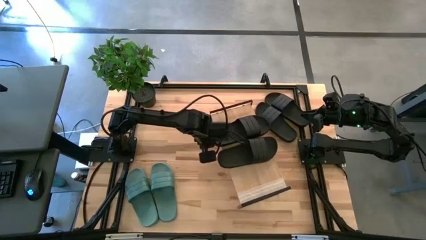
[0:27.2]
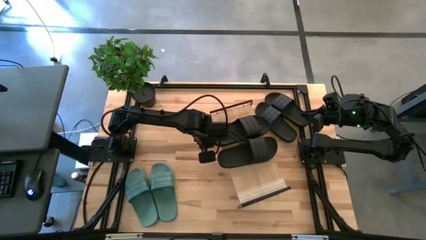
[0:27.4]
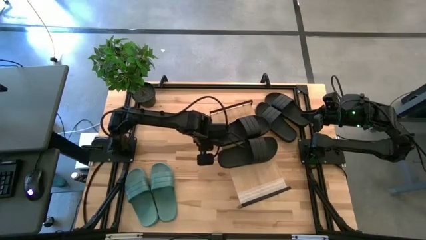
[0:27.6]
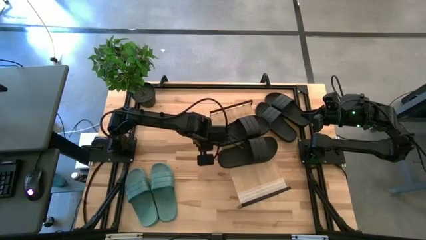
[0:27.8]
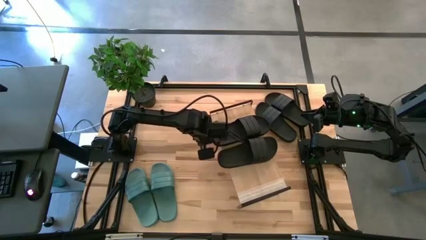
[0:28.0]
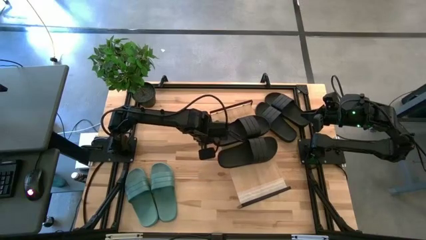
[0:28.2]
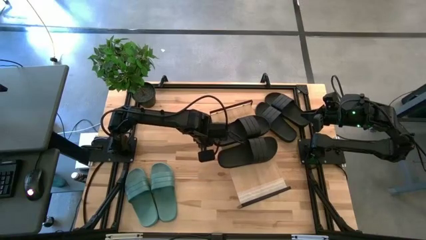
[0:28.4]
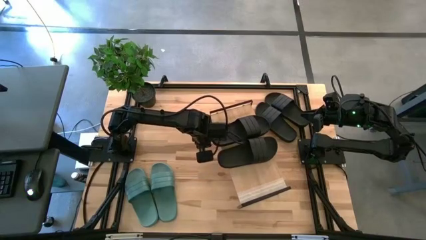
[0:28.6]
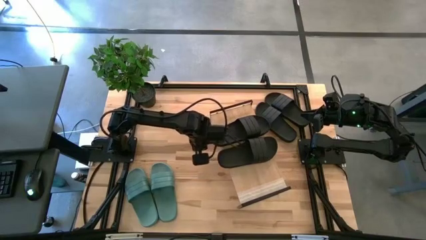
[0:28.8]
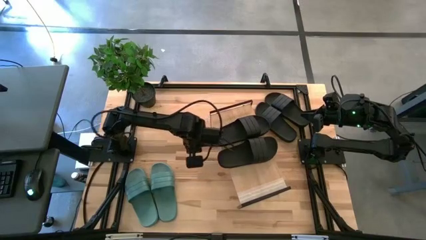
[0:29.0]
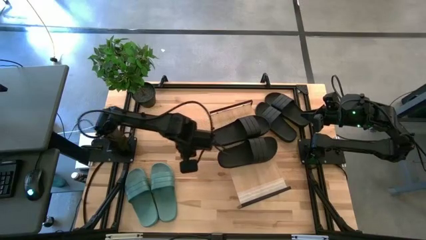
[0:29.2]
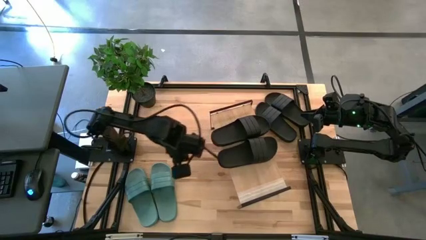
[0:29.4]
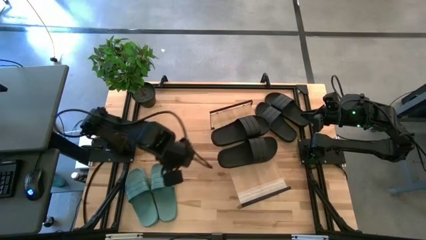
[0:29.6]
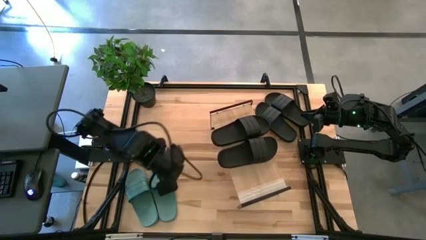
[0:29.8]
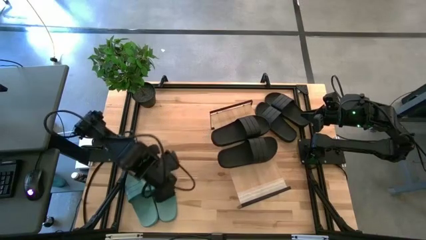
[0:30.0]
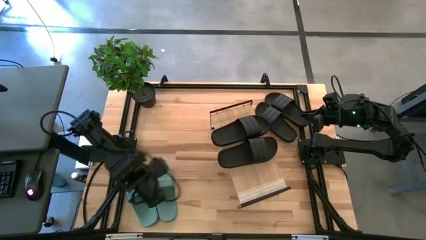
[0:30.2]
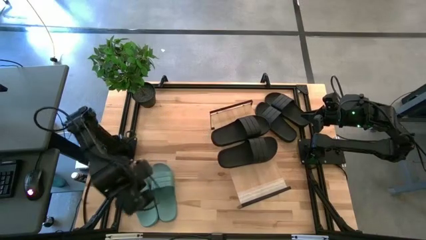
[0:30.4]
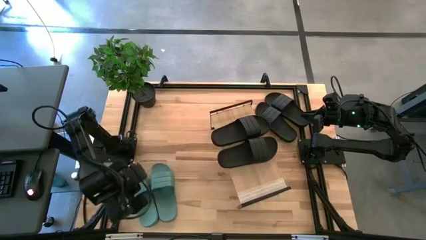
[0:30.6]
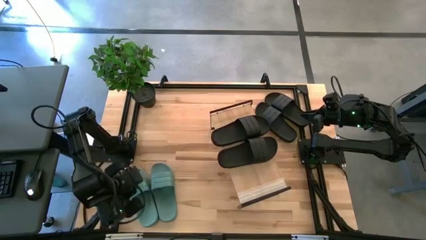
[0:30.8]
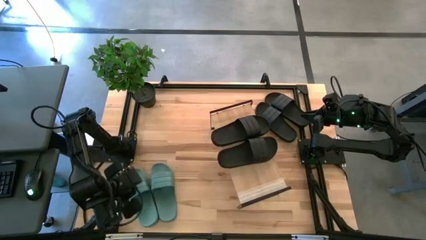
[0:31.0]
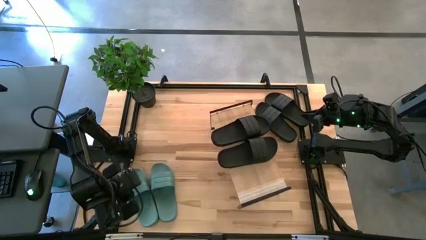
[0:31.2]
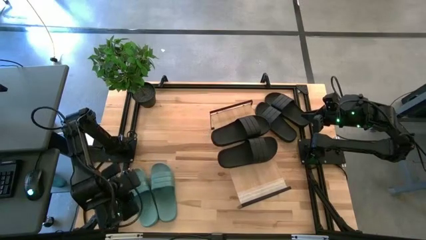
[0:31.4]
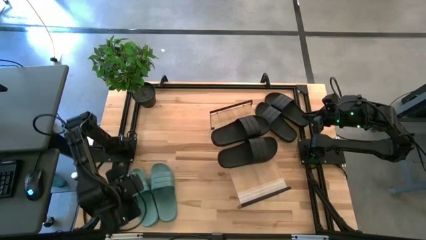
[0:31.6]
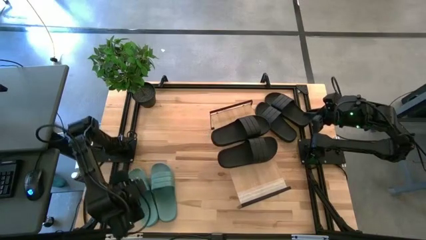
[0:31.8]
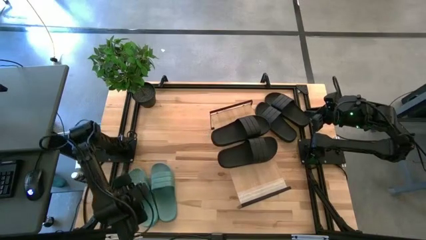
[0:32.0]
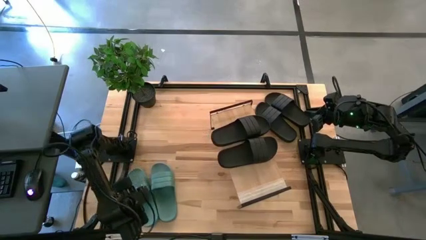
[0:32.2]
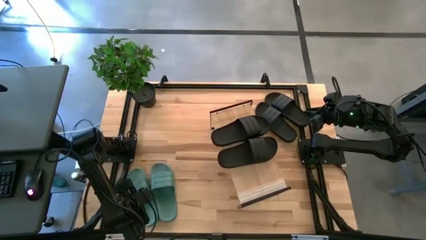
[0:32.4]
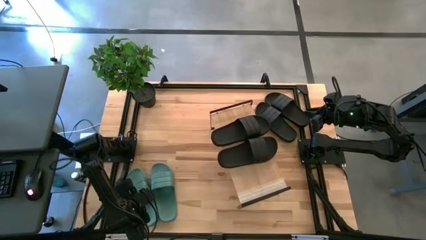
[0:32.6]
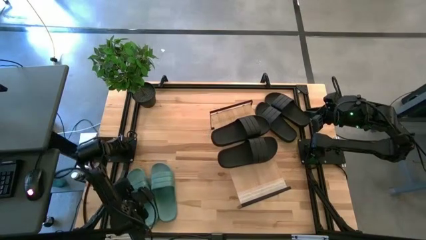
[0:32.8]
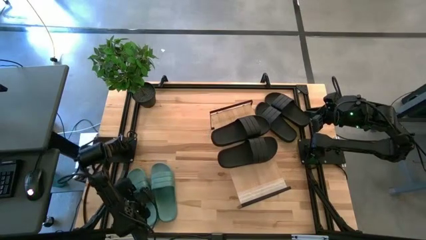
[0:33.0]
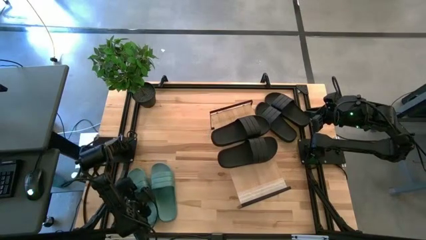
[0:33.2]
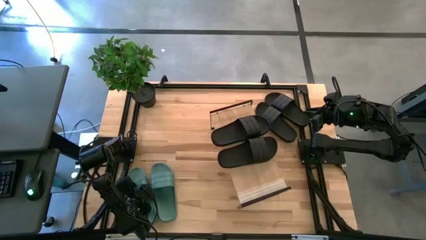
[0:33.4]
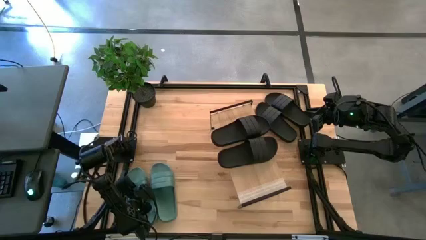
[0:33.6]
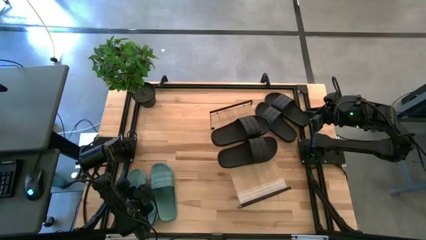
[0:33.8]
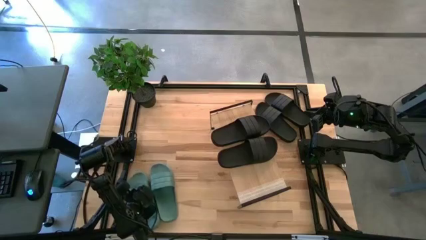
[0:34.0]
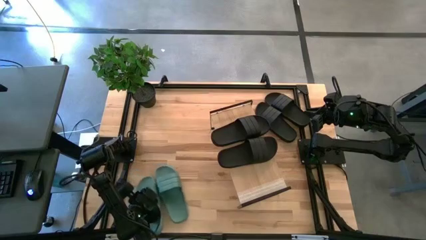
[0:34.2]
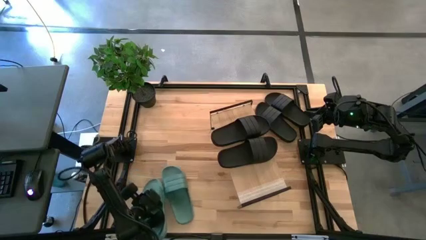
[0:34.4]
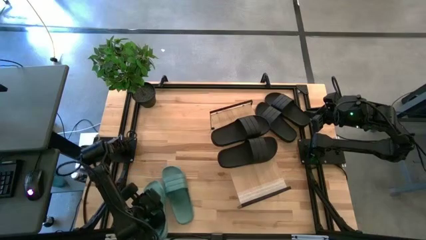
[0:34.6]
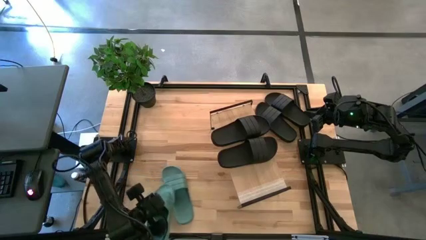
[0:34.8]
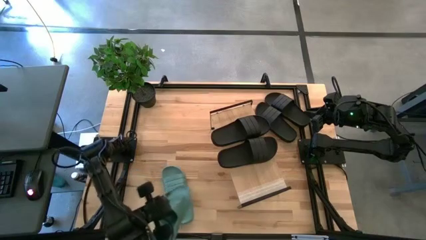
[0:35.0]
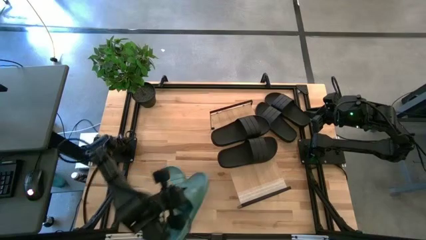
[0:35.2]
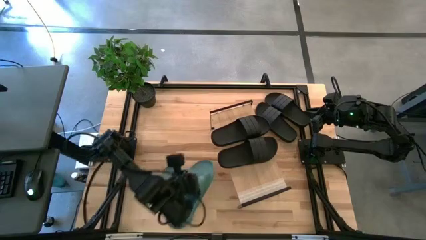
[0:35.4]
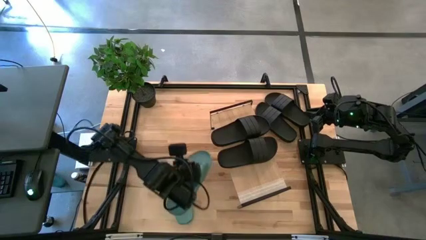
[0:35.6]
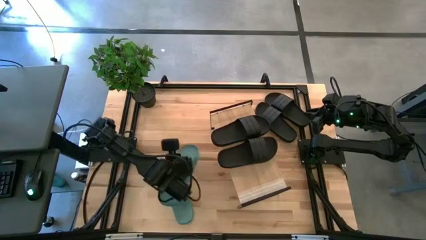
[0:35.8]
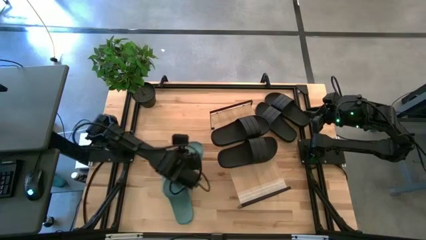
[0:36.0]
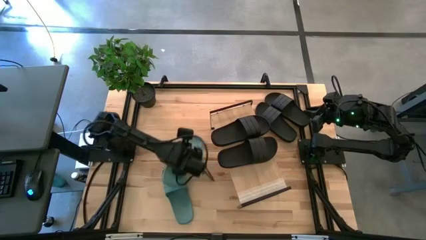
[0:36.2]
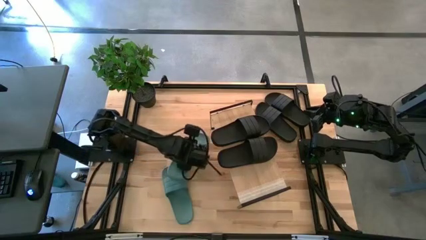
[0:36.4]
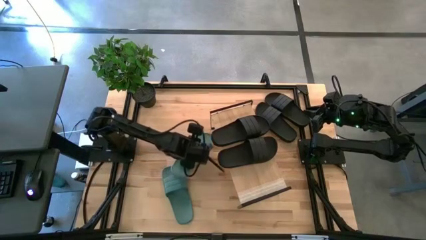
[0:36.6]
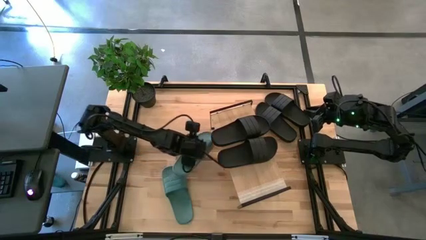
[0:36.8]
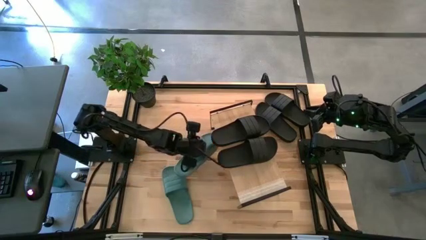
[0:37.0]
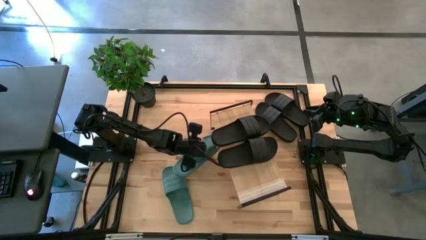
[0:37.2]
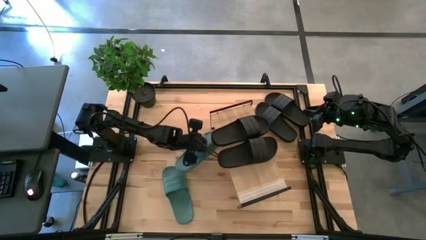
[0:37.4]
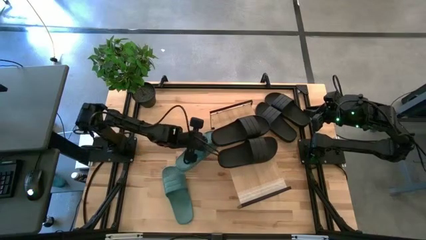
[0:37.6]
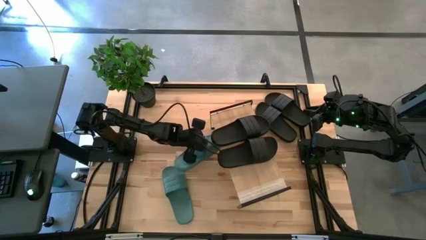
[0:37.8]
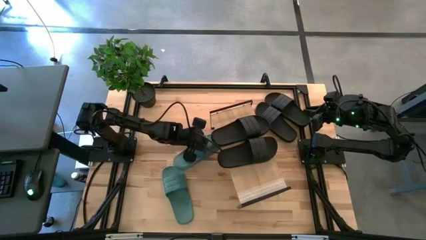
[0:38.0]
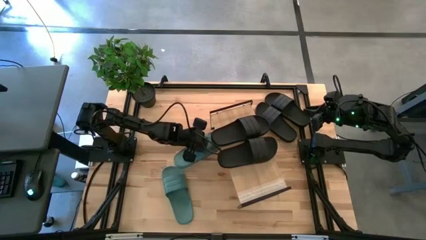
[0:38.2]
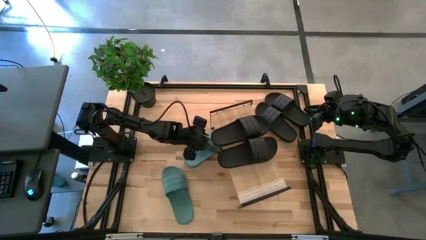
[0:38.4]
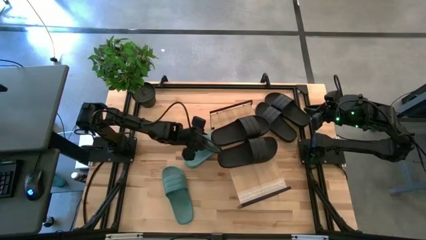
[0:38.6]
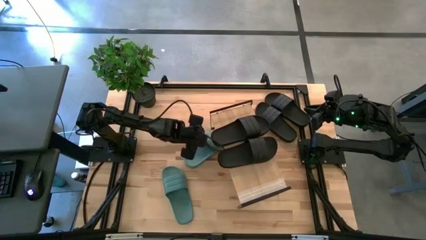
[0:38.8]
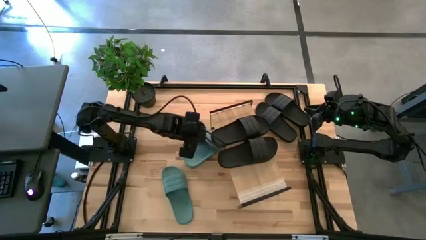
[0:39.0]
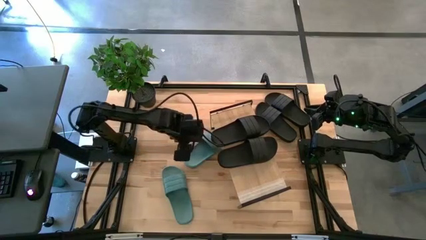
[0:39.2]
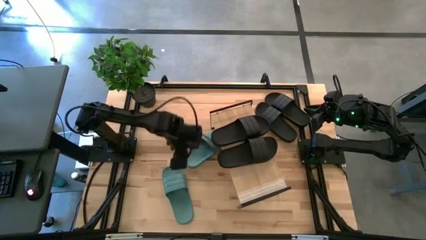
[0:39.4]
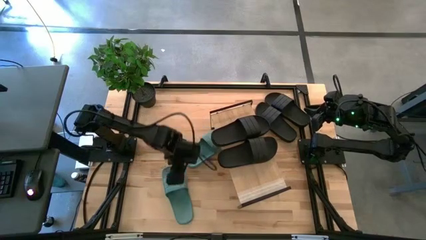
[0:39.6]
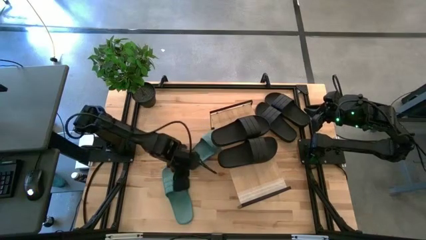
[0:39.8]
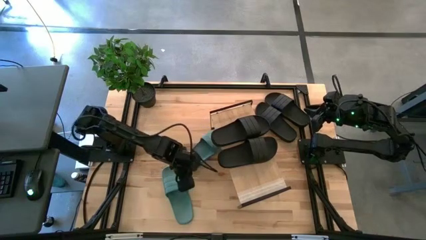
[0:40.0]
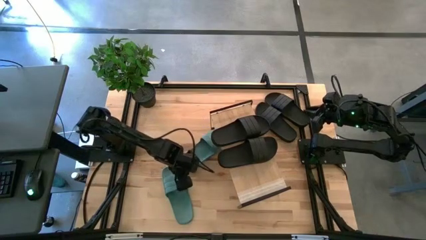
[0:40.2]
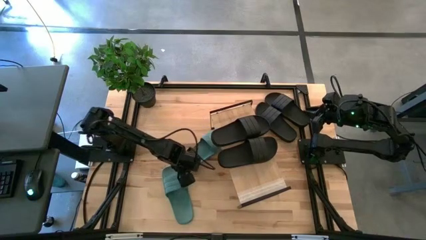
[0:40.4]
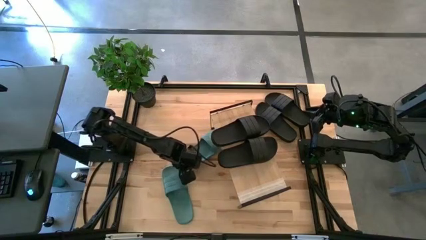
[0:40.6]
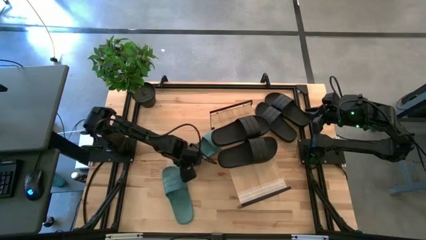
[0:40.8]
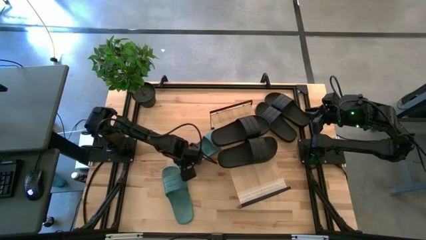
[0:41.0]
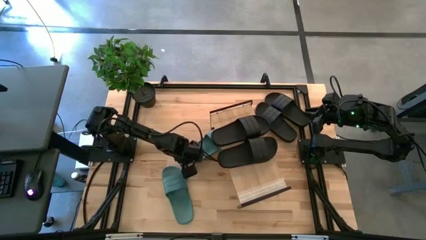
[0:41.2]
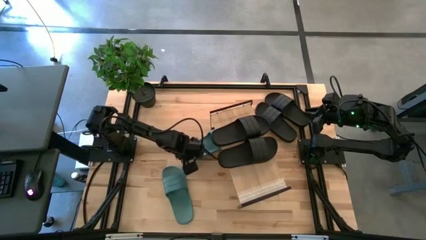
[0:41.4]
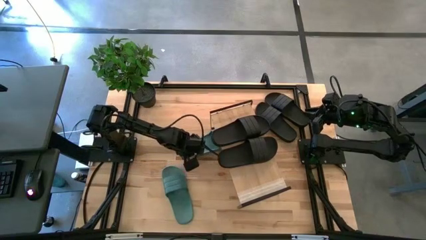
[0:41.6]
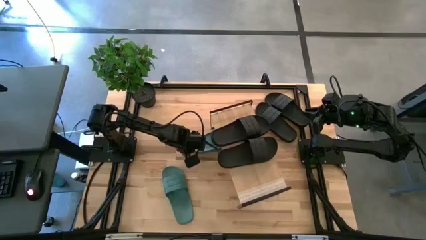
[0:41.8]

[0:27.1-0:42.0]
Task: Pick and place slides into the shelf
Move the green slides under the shelf
